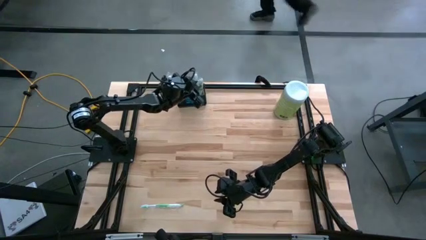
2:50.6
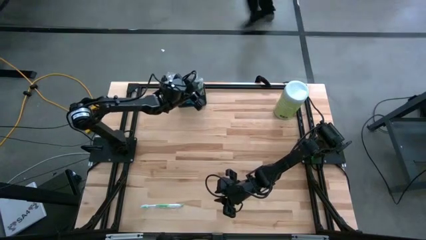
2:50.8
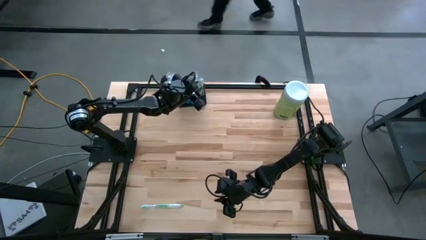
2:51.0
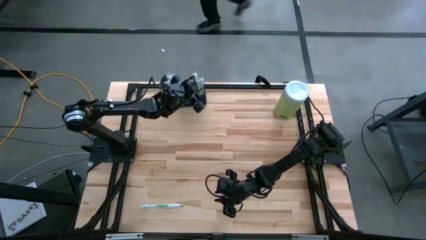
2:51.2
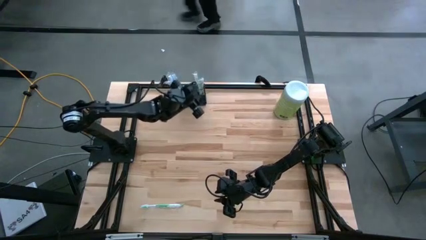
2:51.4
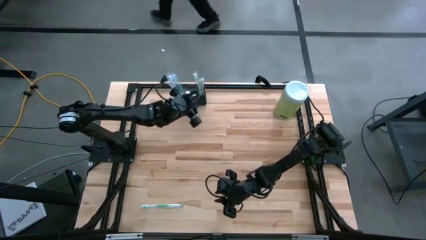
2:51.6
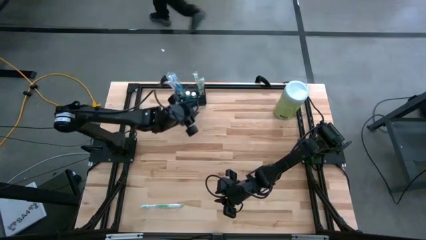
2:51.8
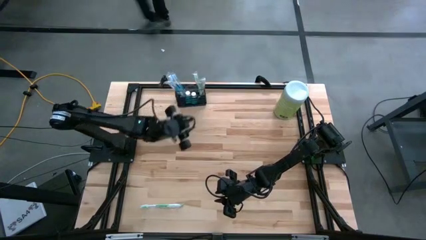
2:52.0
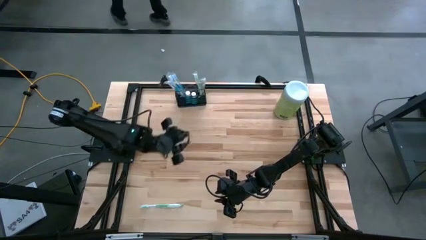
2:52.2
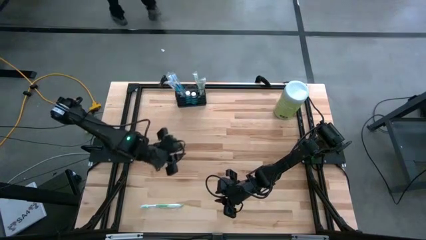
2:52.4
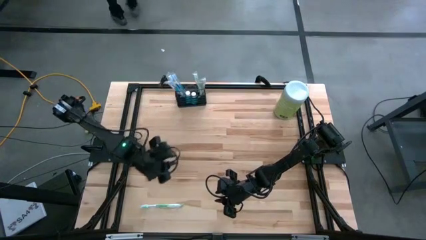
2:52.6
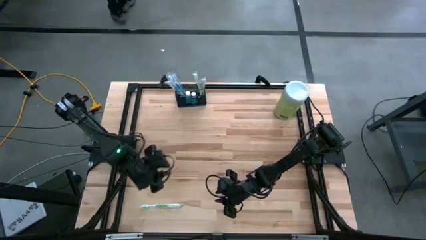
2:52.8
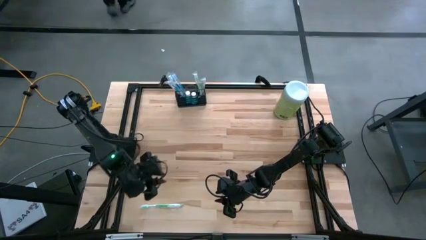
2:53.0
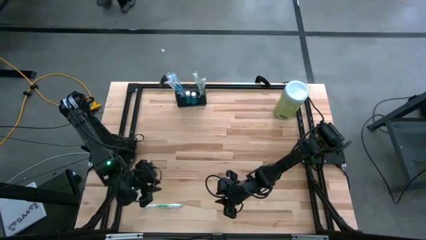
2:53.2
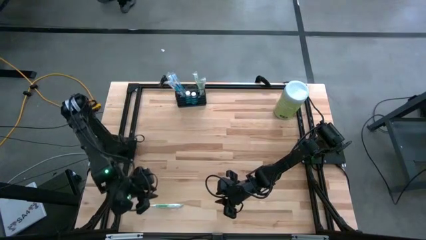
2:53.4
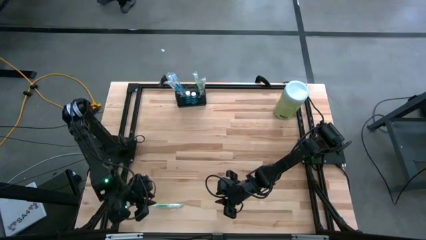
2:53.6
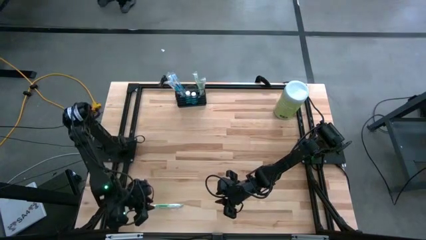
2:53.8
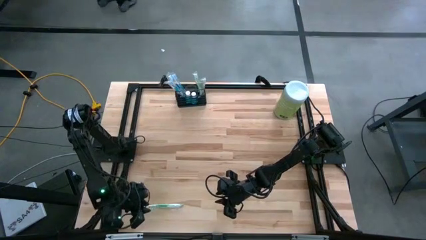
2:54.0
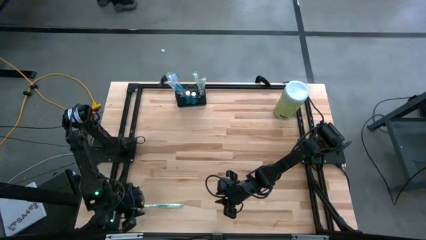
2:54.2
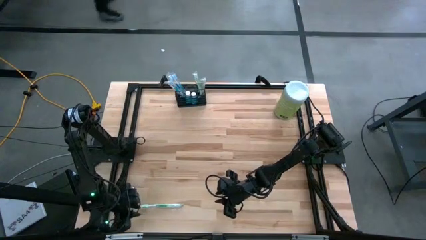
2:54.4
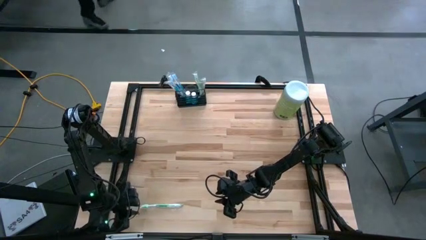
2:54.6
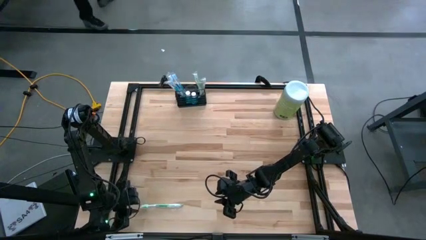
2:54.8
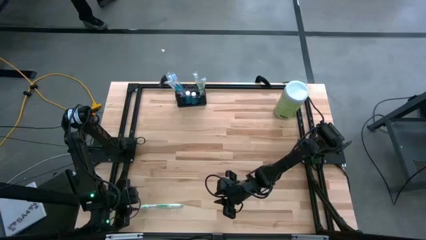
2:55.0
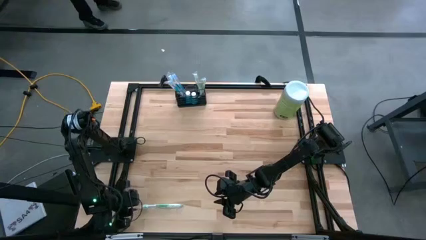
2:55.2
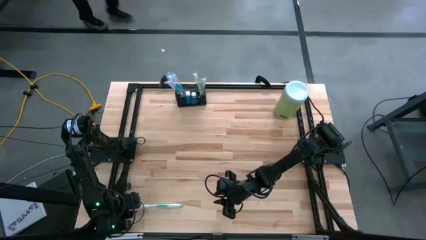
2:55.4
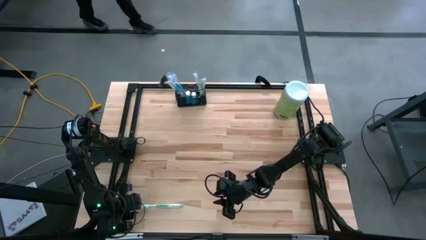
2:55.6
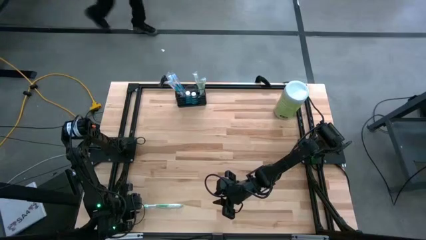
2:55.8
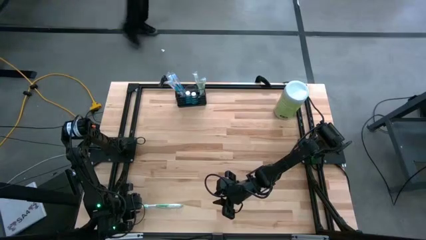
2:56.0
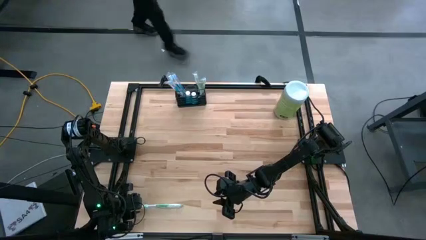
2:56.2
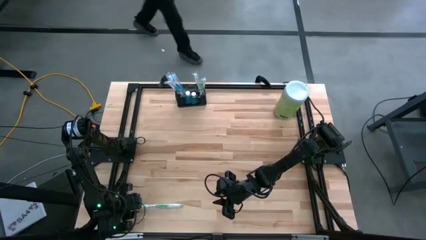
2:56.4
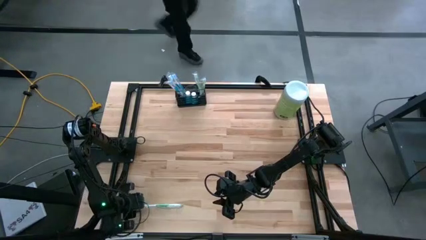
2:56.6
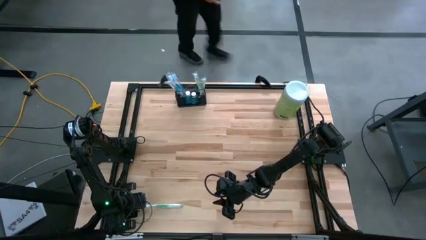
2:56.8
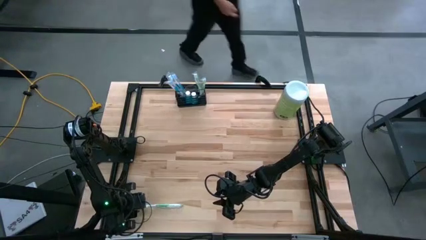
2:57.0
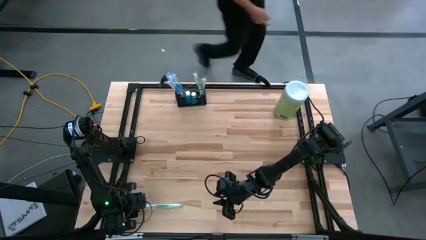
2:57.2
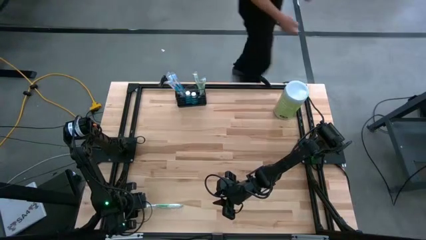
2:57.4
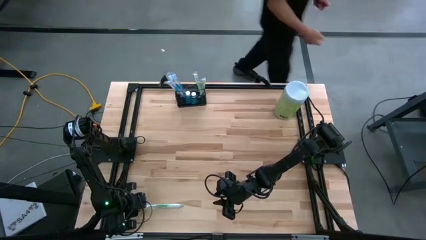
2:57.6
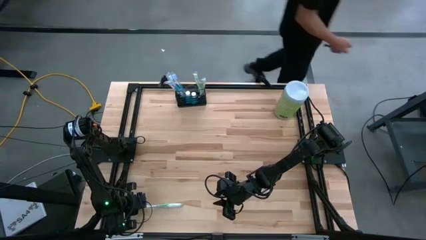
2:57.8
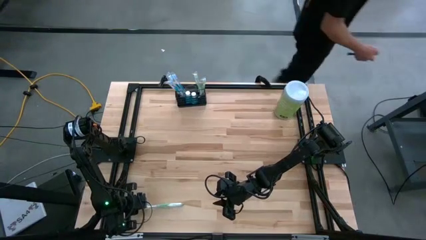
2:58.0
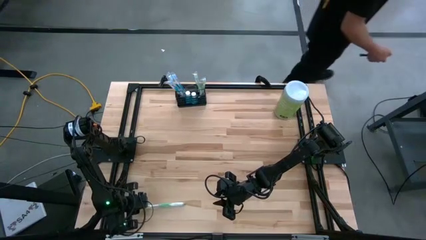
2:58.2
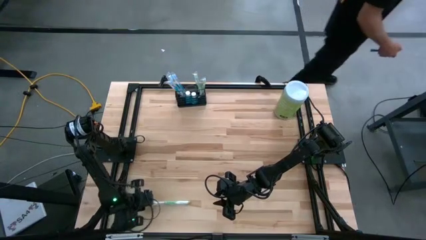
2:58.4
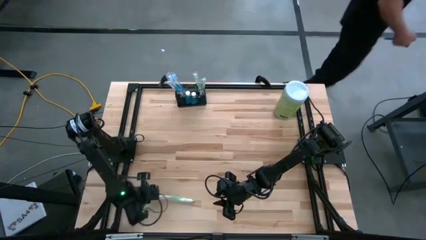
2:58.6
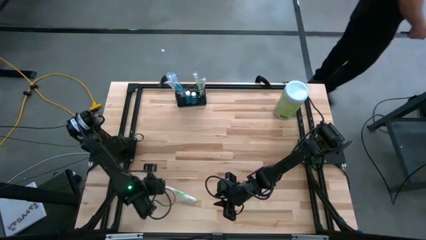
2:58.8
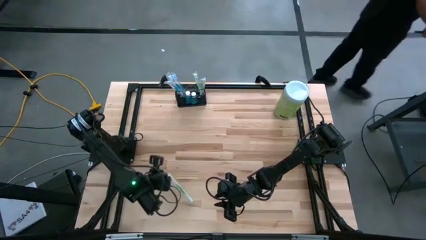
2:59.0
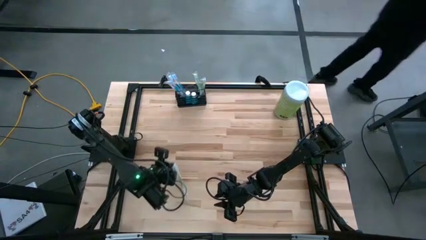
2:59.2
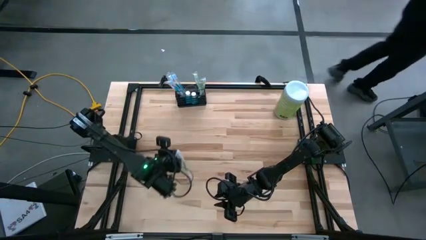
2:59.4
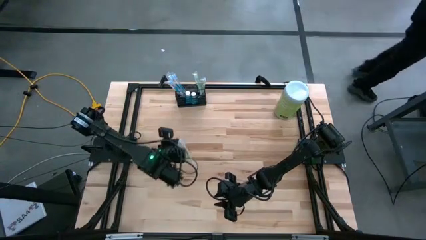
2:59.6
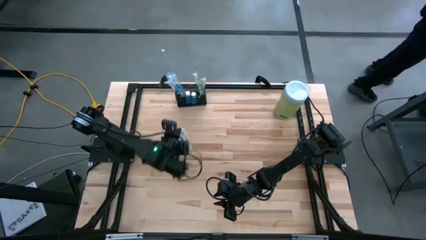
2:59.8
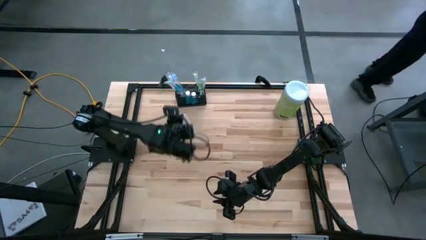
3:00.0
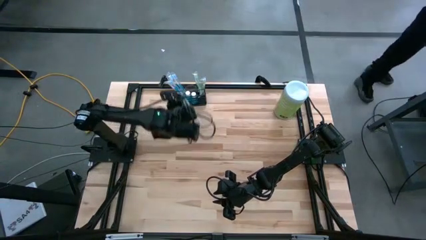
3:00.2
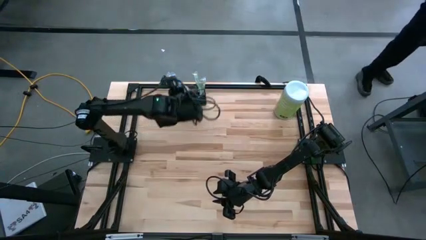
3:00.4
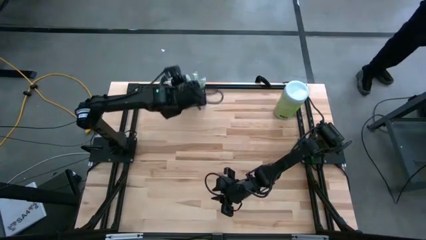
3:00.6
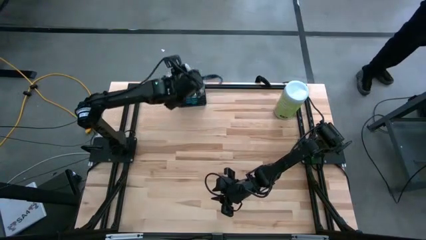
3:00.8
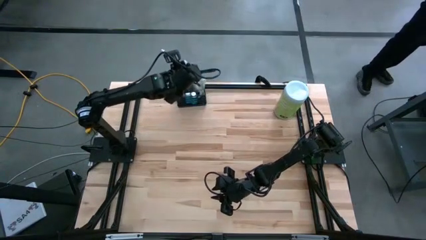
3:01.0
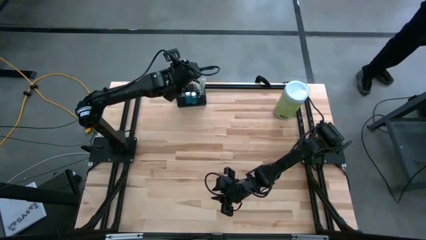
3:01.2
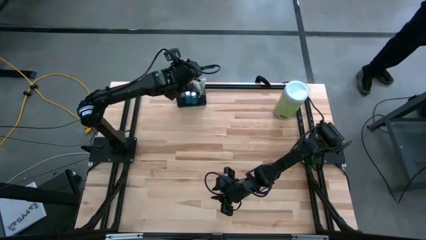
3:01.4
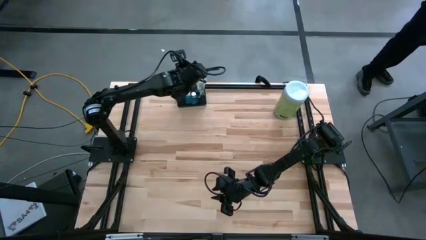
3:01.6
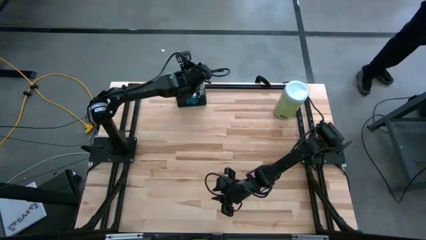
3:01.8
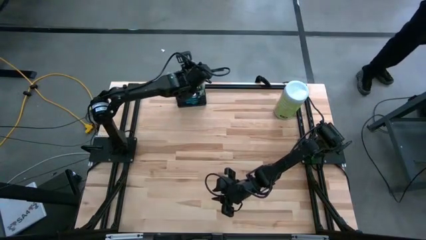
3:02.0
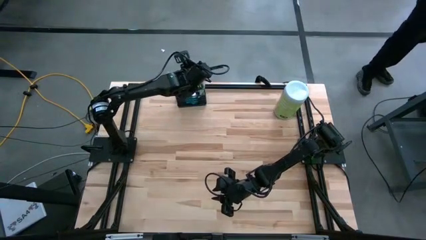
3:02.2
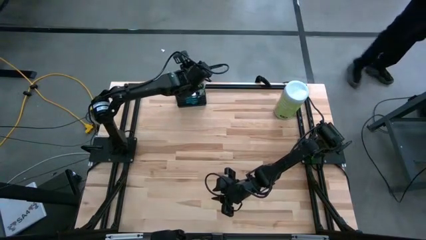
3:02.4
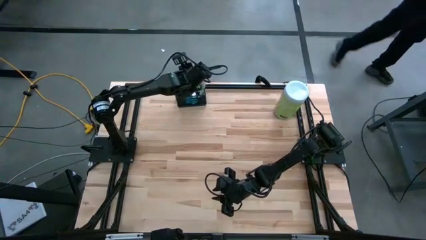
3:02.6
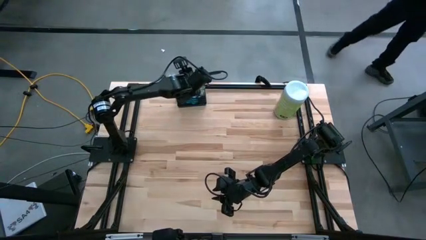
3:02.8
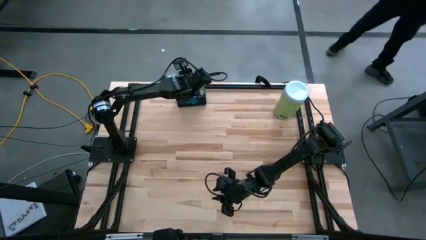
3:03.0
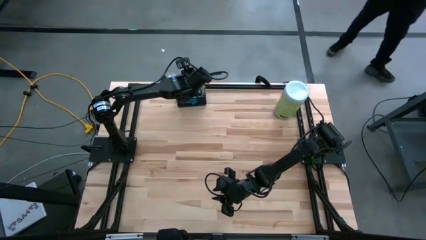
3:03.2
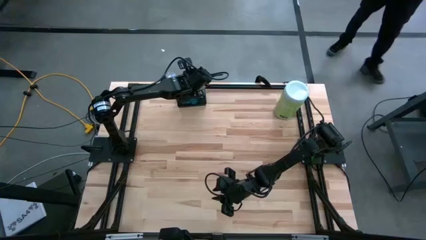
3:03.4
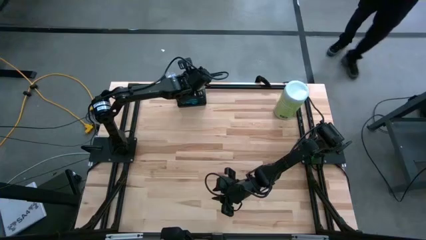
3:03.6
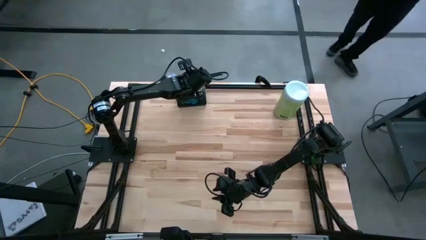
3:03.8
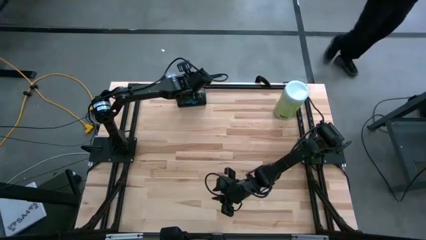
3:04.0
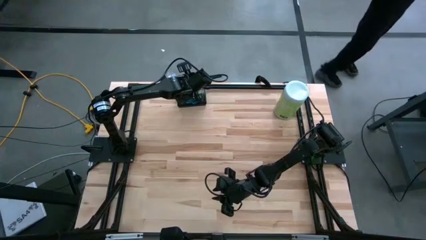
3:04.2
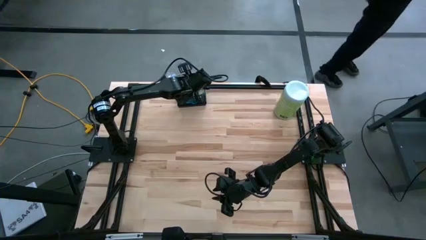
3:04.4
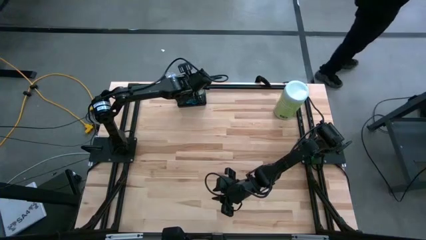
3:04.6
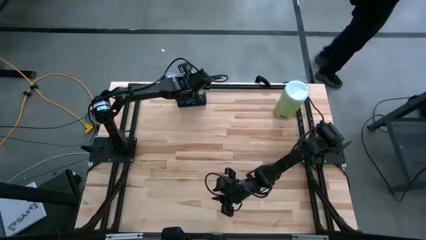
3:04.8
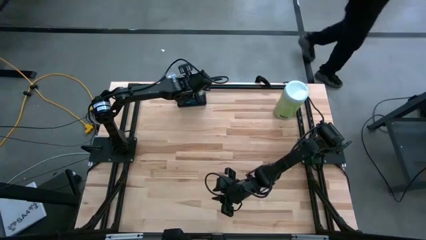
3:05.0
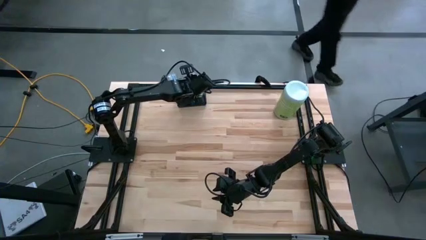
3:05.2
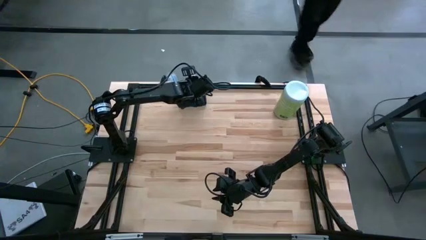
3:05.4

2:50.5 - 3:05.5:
Task: Pick & Place toothbrushing station
Put the green toothbrush into the wire organizer
